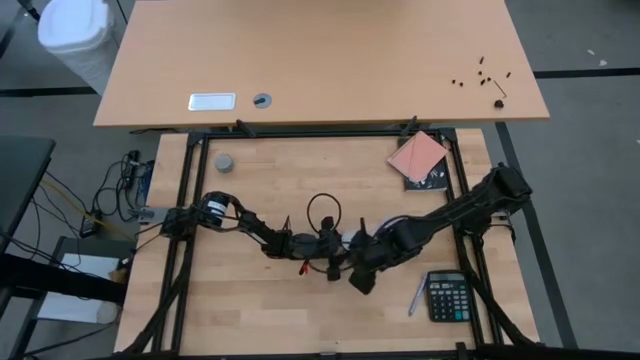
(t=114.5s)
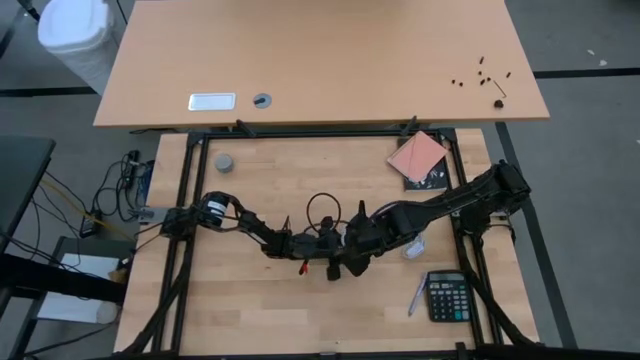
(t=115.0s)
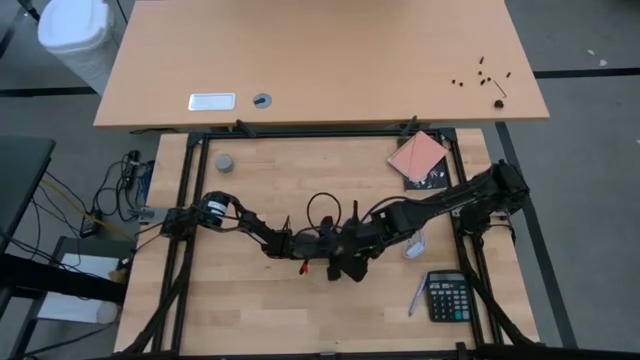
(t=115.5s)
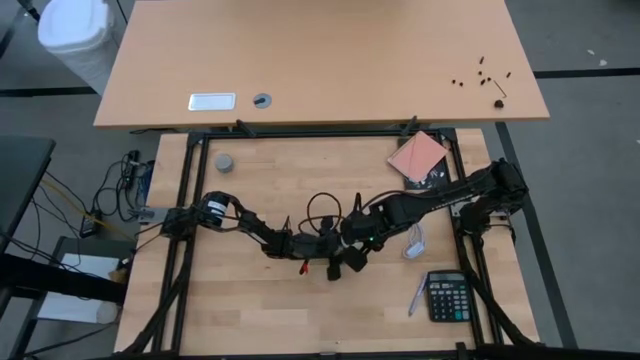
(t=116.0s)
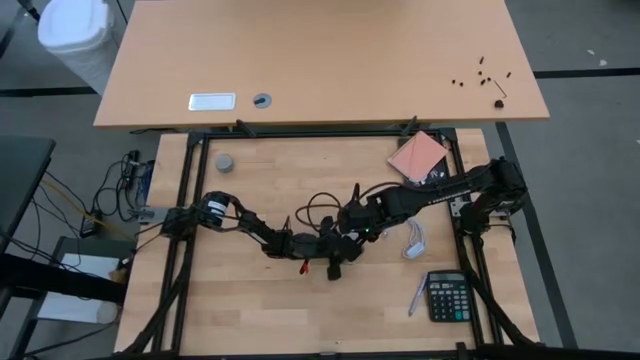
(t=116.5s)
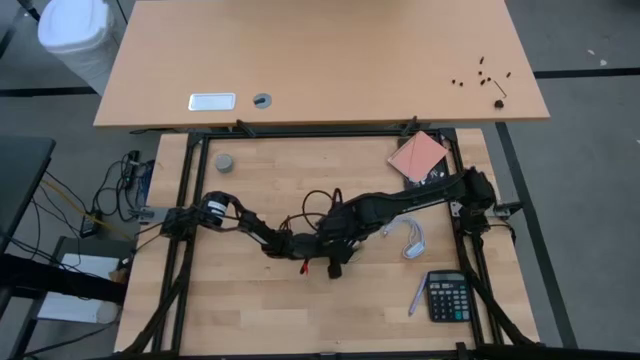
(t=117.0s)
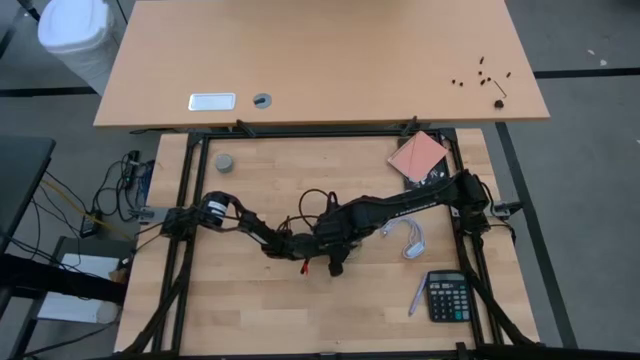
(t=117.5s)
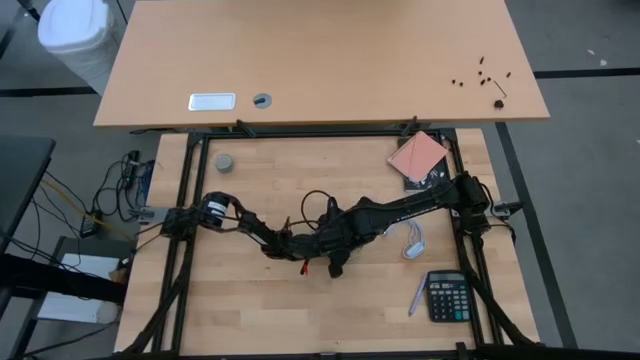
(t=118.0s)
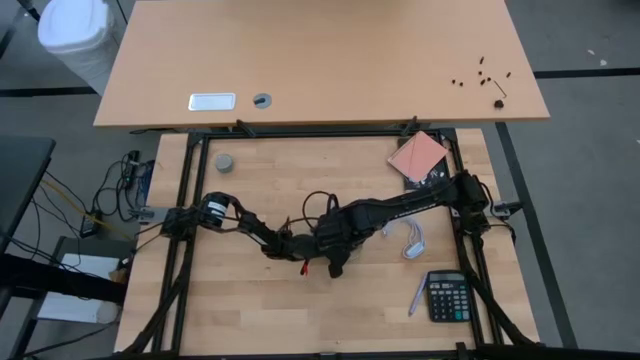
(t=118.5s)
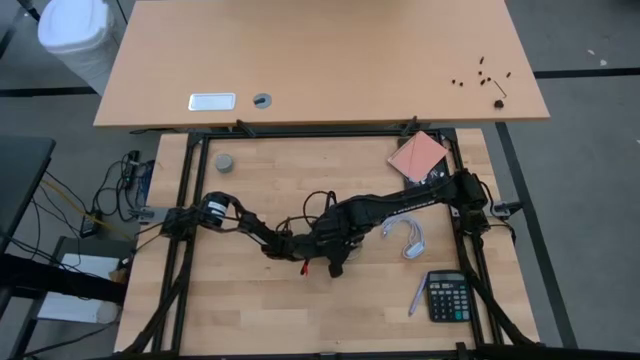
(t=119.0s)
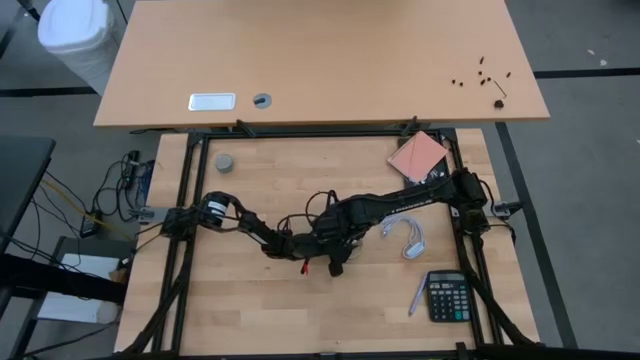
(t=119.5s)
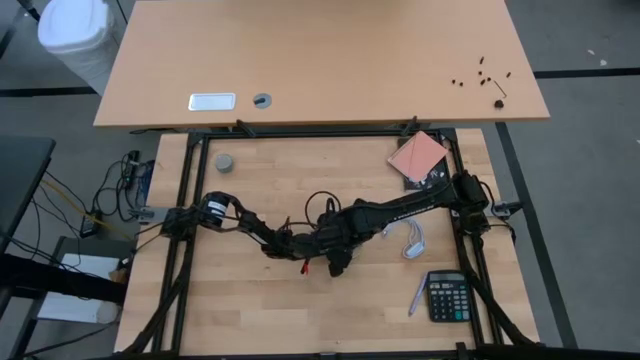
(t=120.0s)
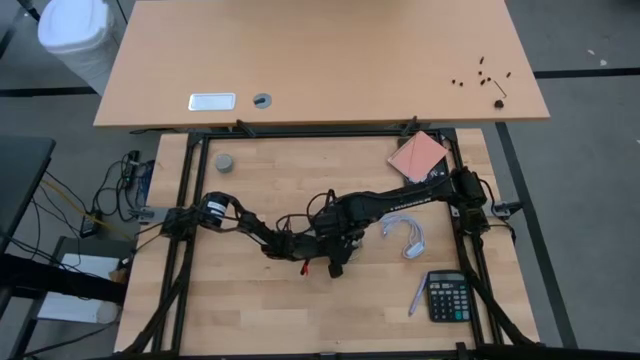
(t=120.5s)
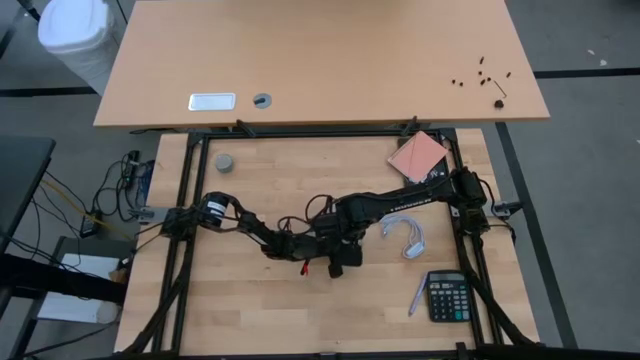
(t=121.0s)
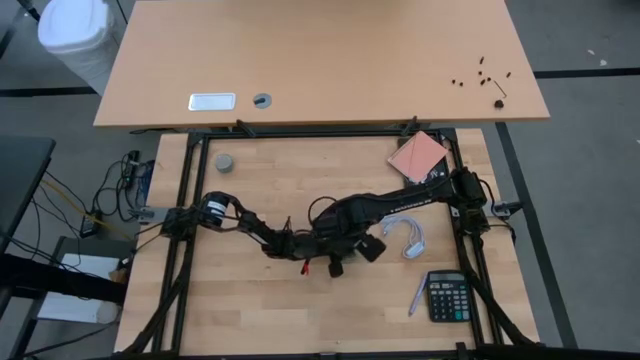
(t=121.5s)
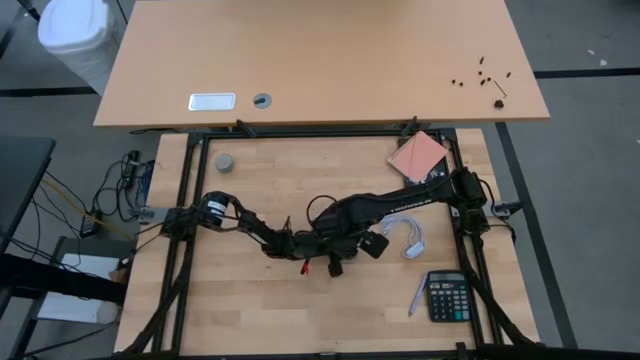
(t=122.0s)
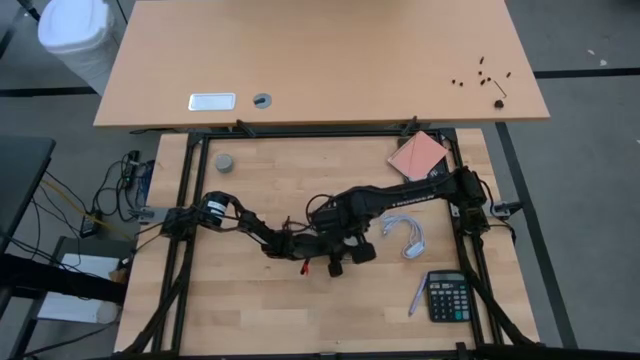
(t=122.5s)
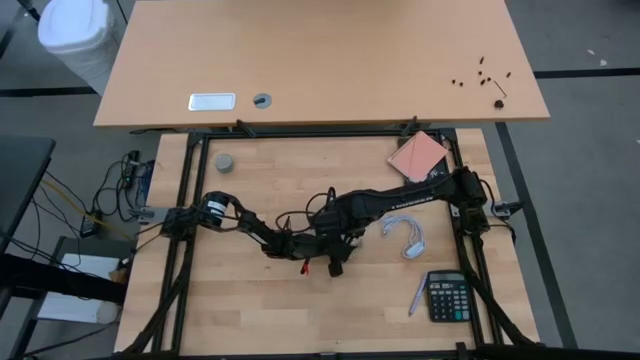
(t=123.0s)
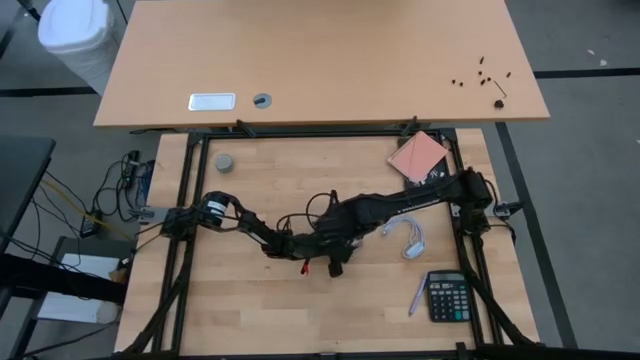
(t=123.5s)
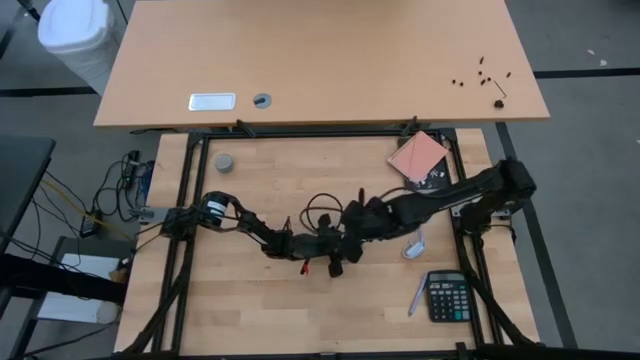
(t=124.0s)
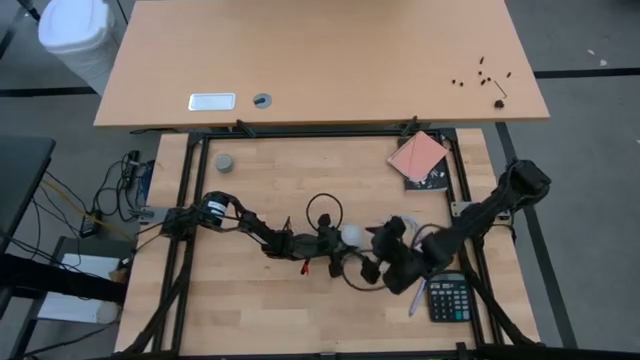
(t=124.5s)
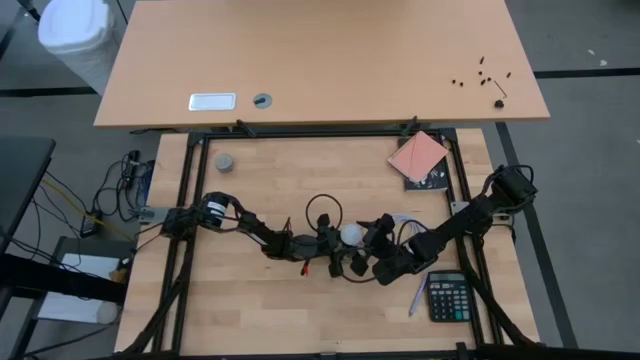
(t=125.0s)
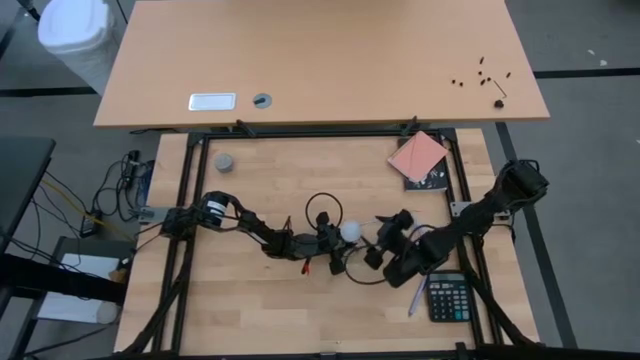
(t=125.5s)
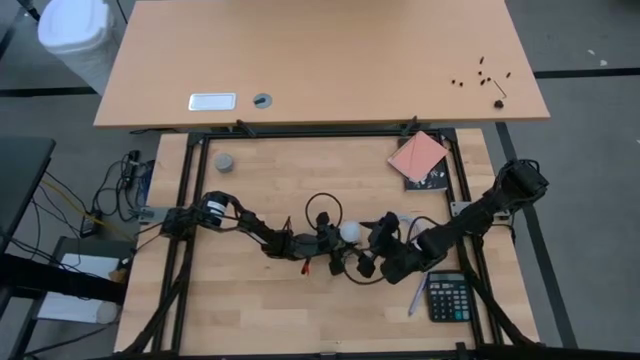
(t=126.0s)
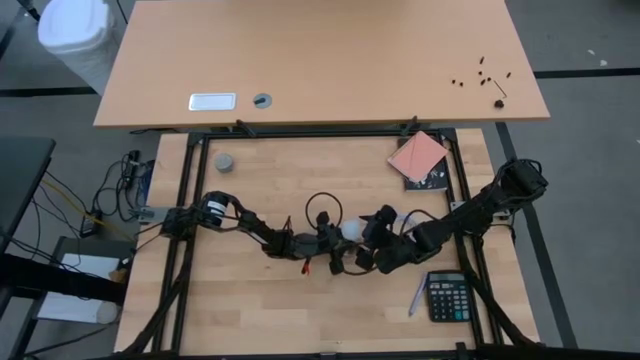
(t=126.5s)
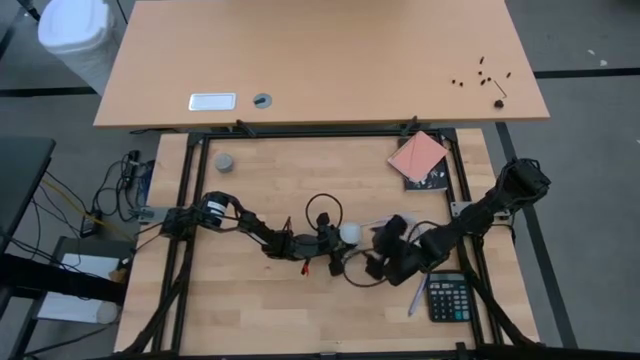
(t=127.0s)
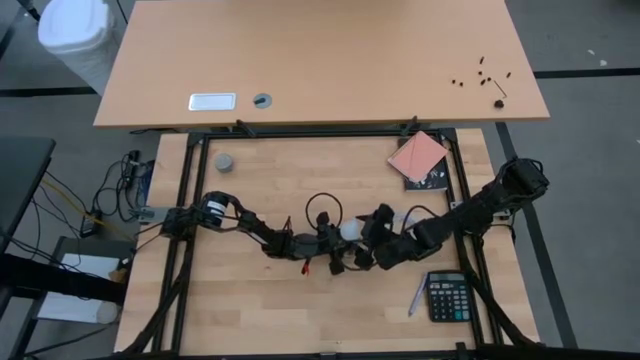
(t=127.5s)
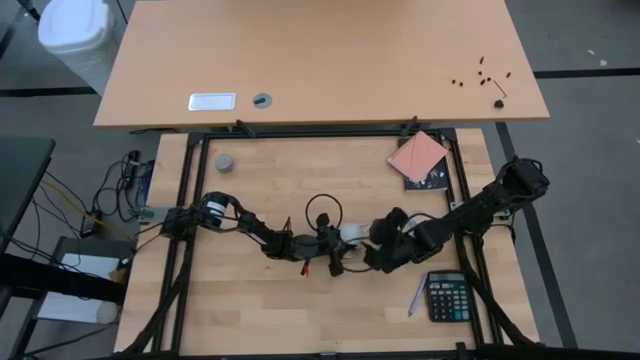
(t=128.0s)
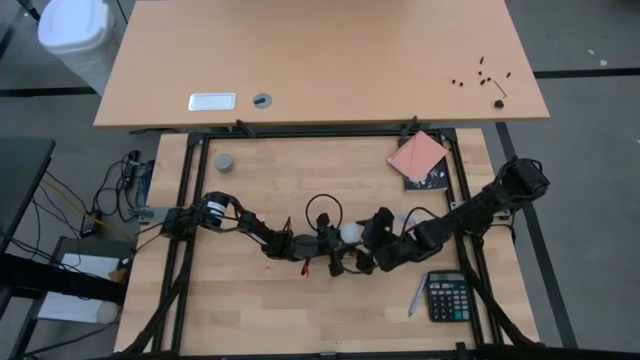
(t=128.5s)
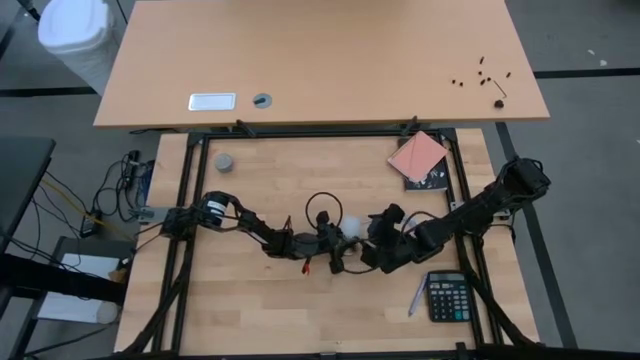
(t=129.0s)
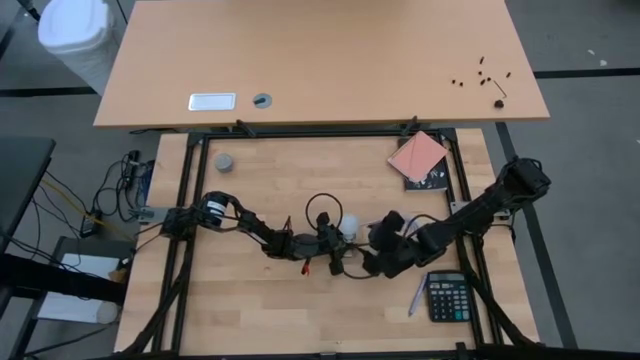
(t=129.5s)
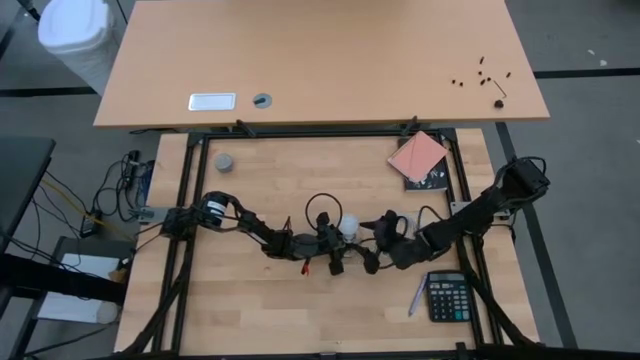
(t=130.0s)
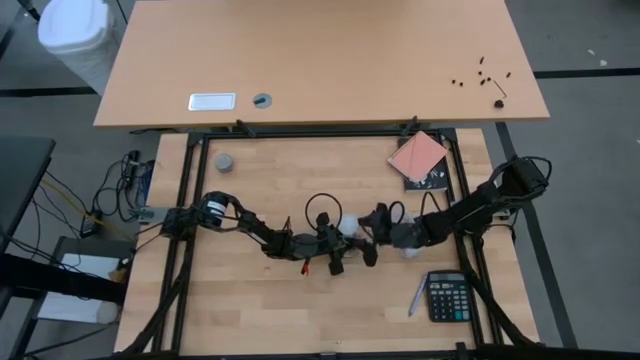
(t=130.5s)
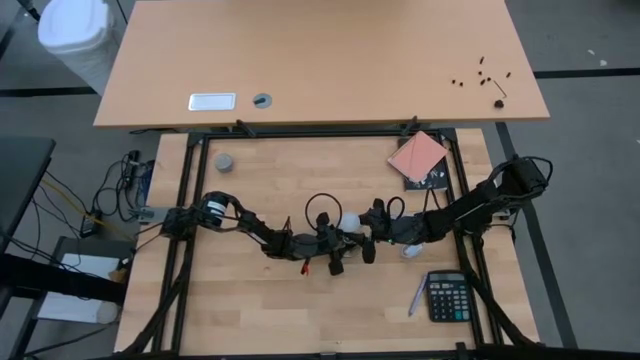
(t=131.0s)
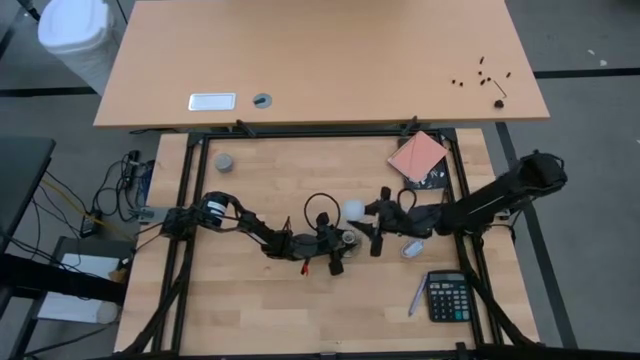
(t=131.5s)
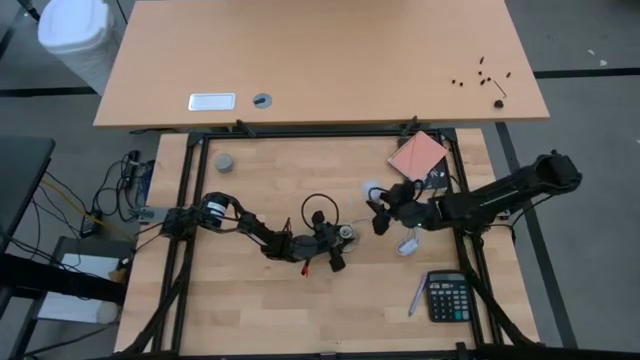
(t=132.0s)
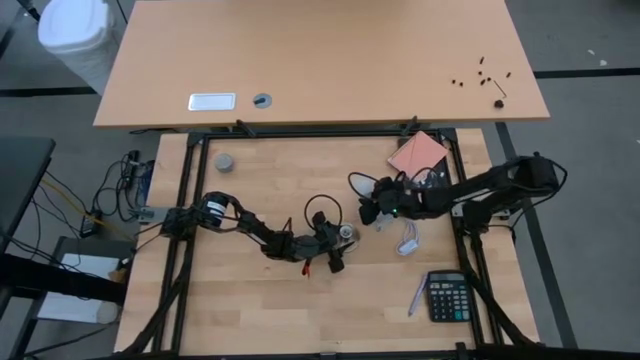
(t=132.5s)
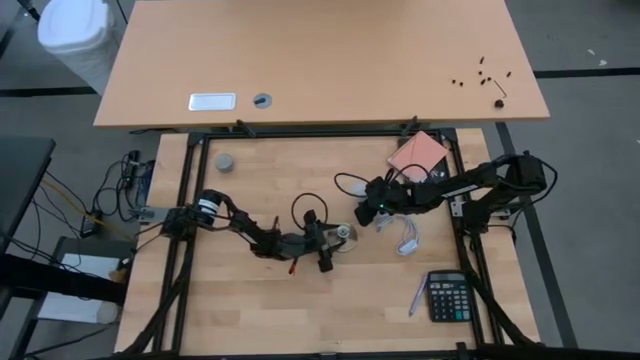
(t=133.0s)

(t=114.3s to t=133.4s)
Task: Screw lightbulb
Remove the white lightbulb from the golden lamp
